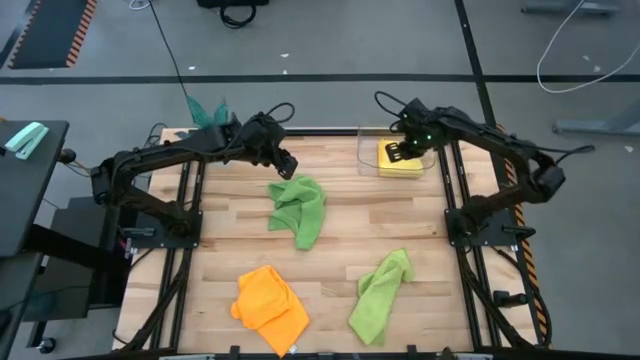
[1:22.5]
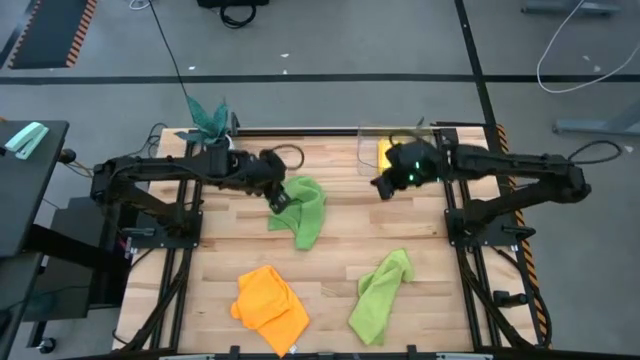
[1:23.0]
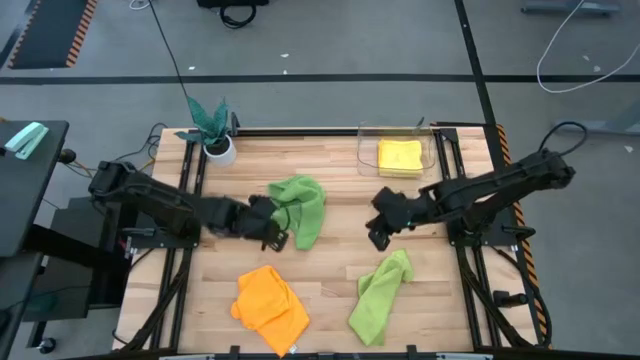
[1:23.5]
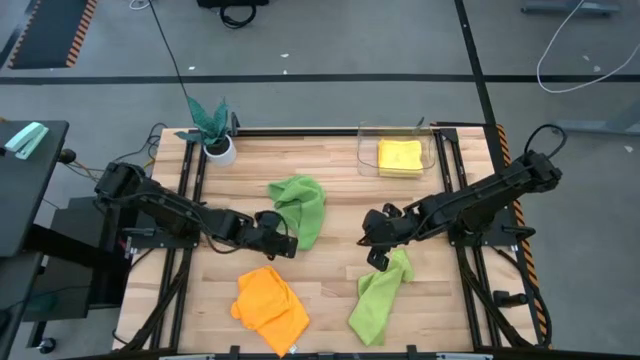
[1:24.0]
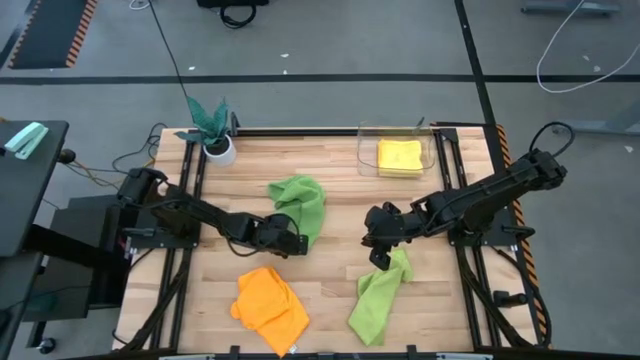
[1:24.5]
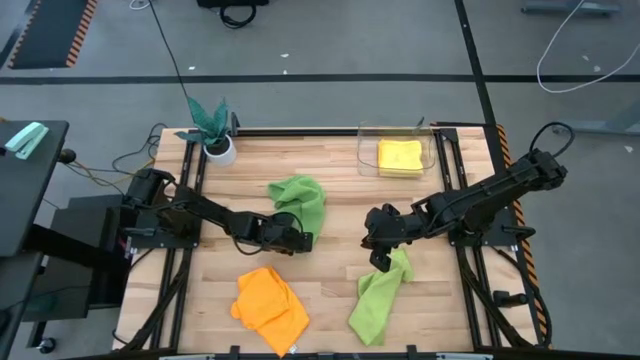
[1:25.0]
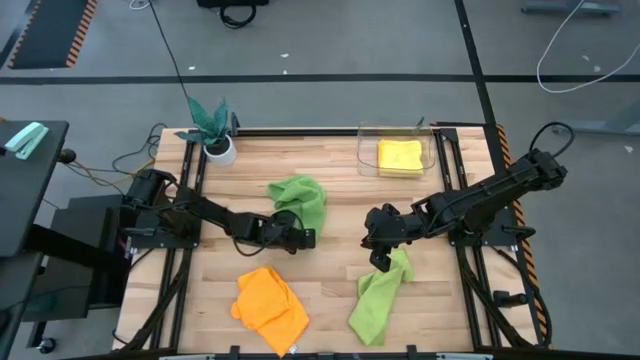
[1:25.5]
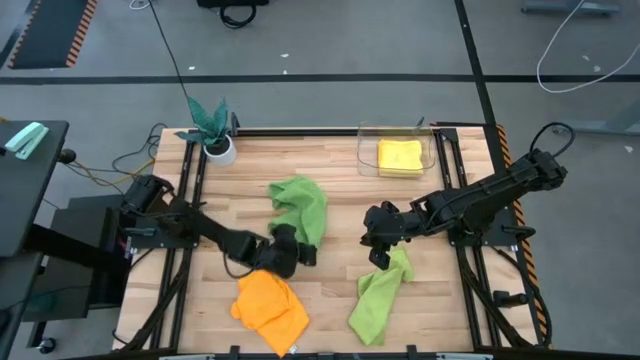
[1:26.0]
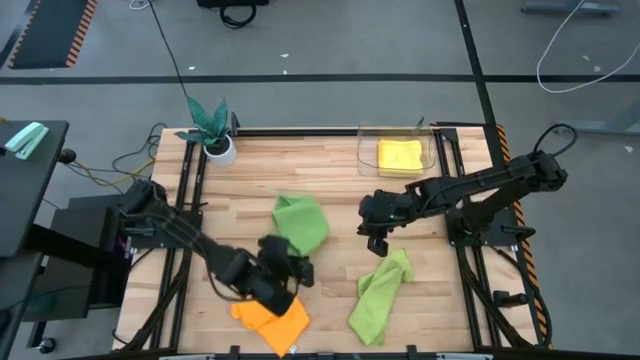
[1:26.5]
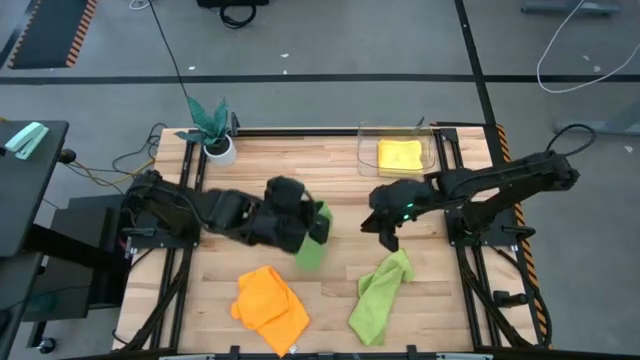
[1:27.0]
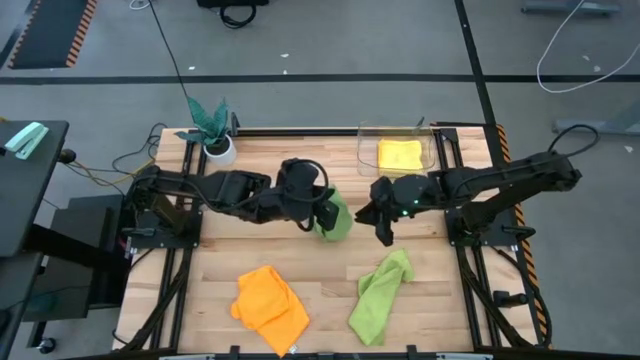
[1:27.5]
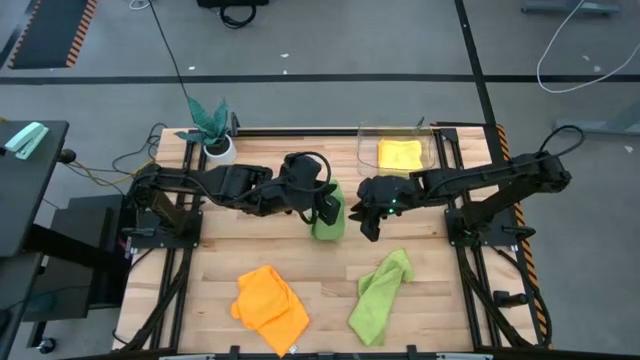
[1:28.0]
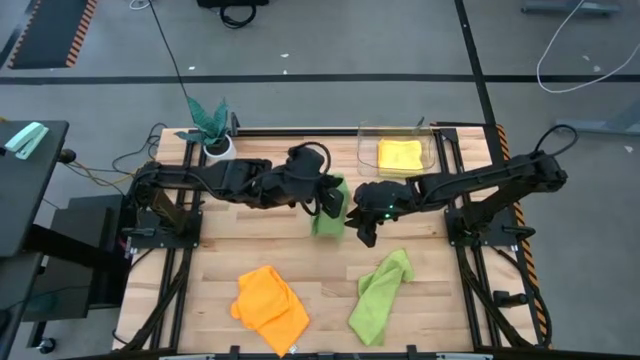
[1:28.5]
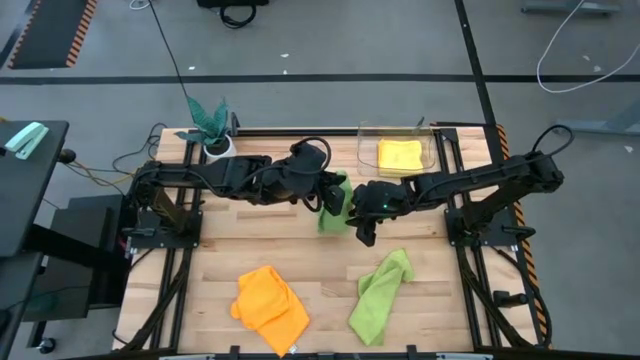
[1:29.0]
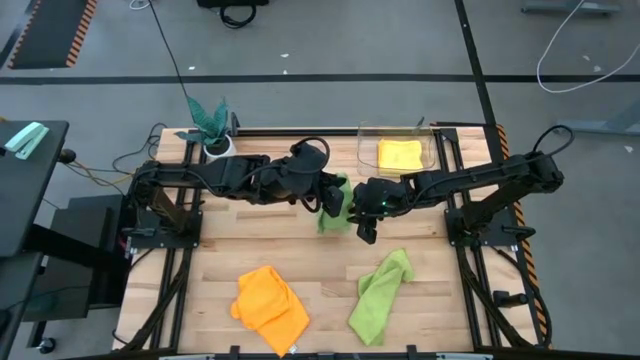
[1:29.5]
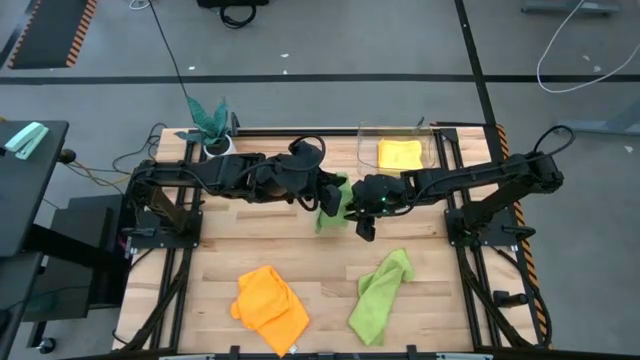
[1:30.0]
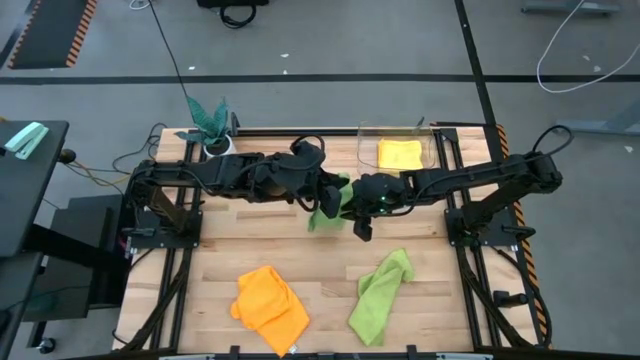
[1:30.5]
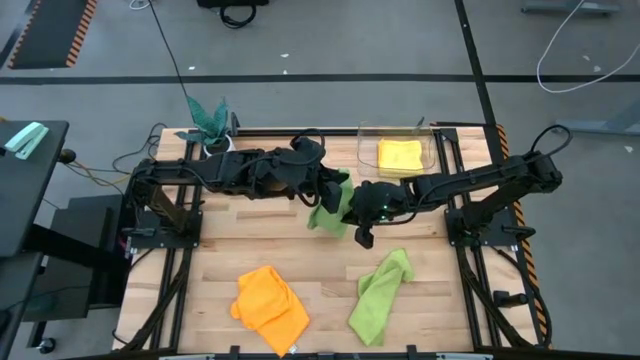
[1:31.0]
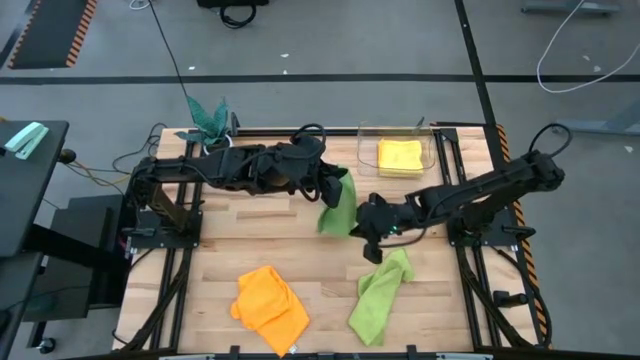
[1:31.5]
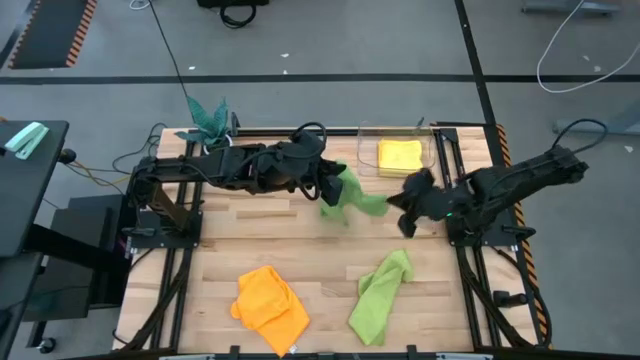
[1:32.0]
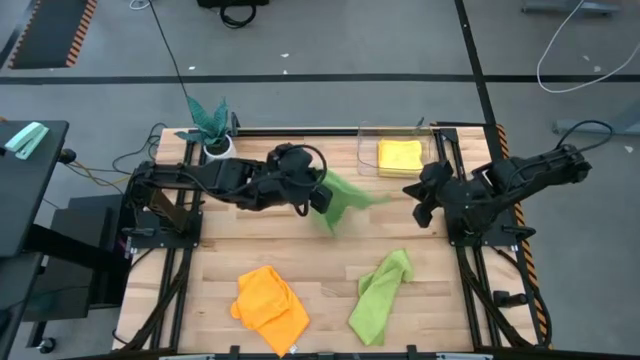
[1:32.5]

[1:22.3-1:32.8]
Task: Fold microfiber towels
Fold the green towel

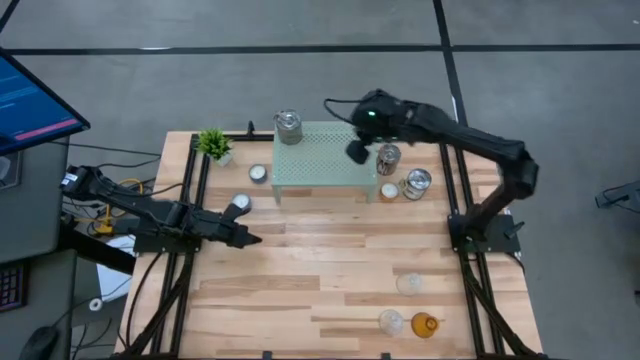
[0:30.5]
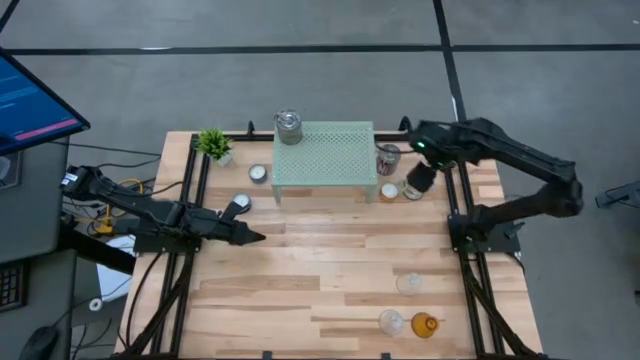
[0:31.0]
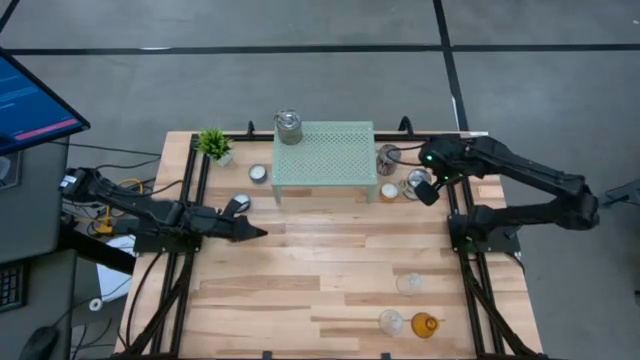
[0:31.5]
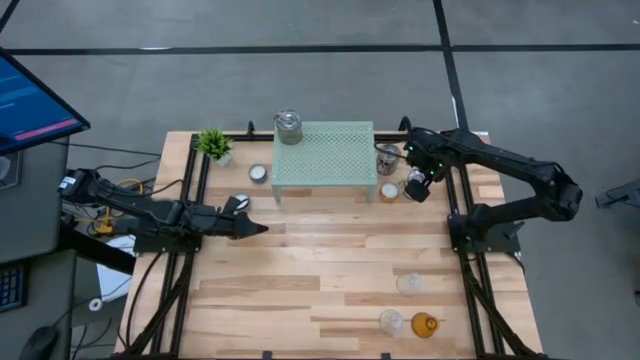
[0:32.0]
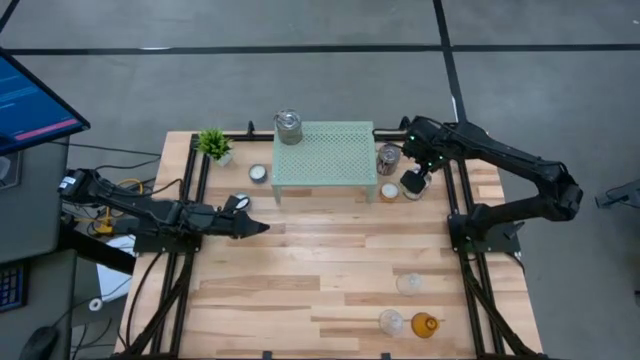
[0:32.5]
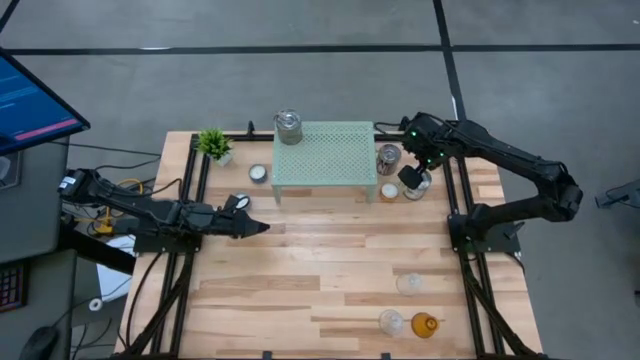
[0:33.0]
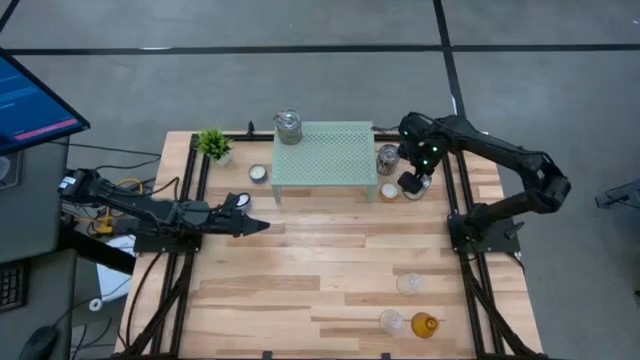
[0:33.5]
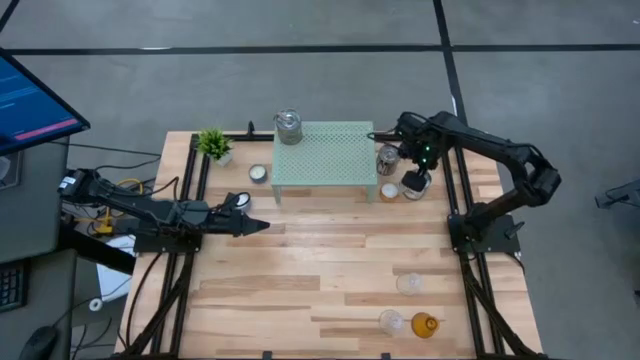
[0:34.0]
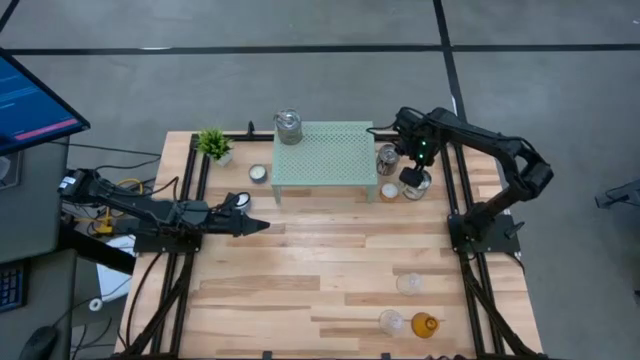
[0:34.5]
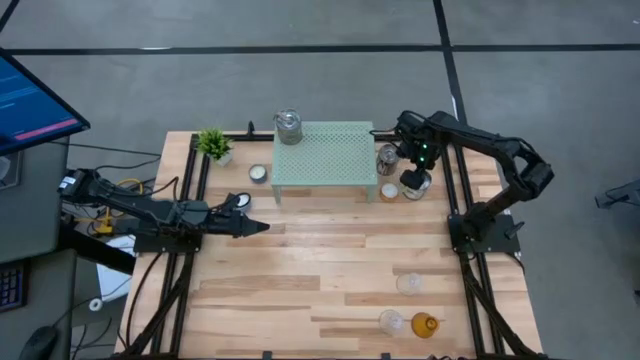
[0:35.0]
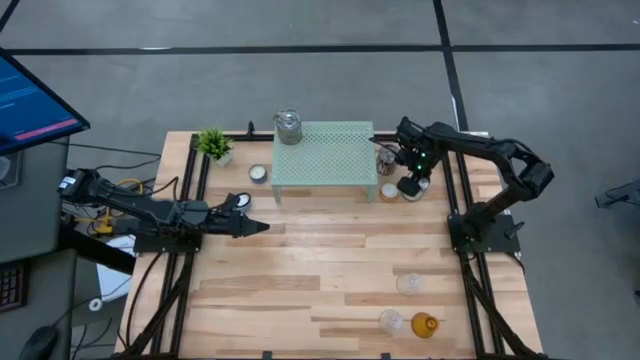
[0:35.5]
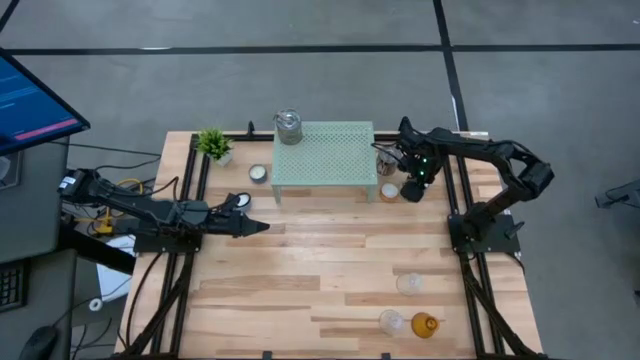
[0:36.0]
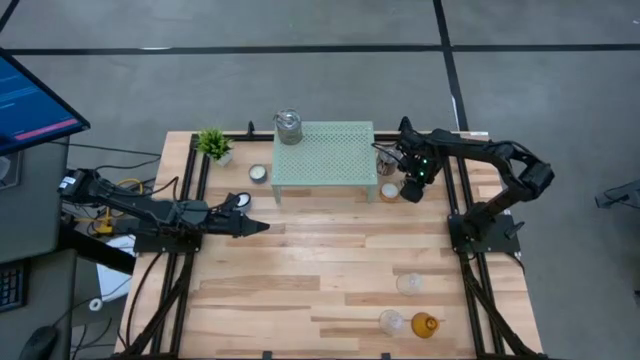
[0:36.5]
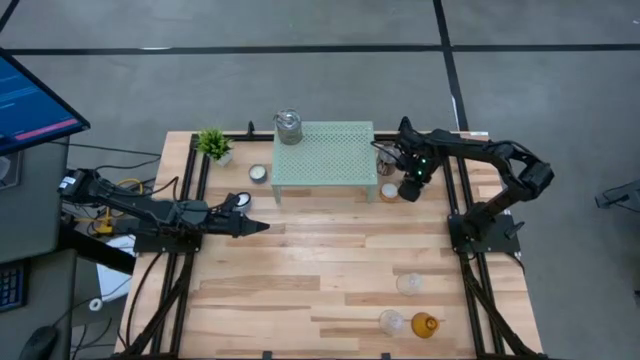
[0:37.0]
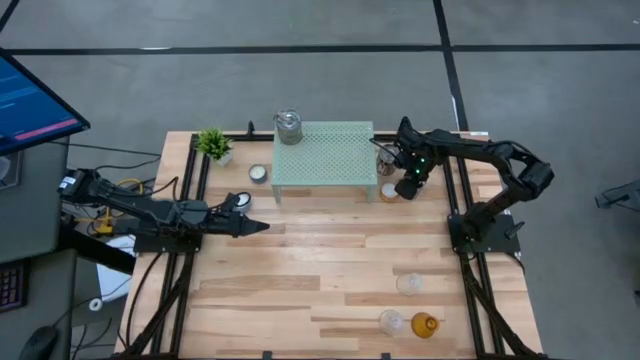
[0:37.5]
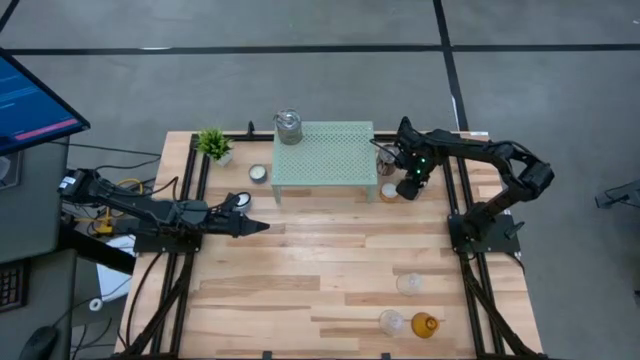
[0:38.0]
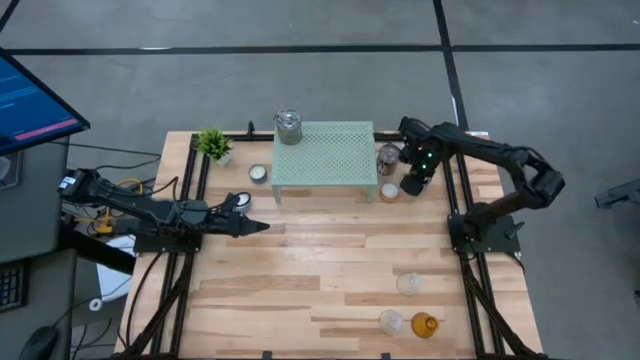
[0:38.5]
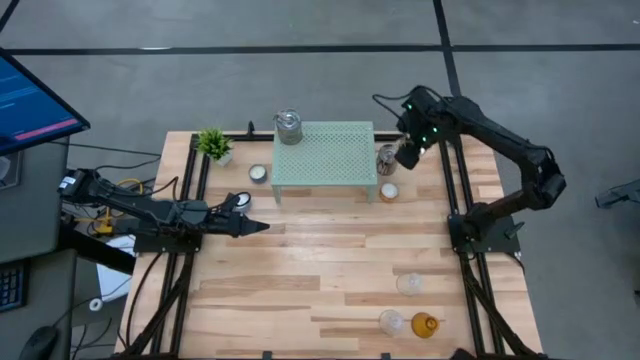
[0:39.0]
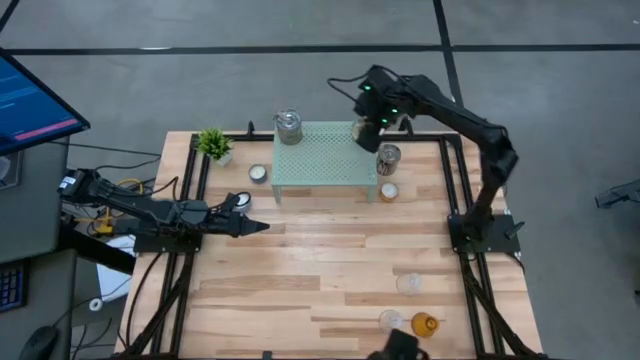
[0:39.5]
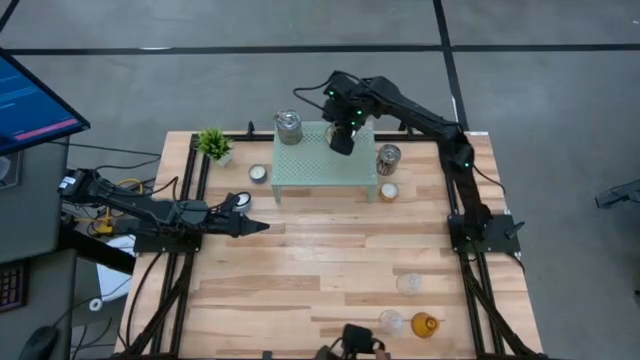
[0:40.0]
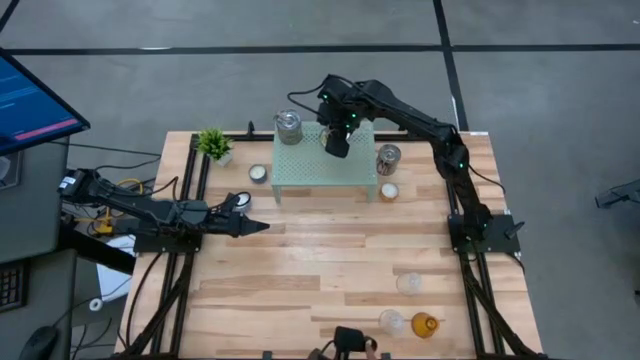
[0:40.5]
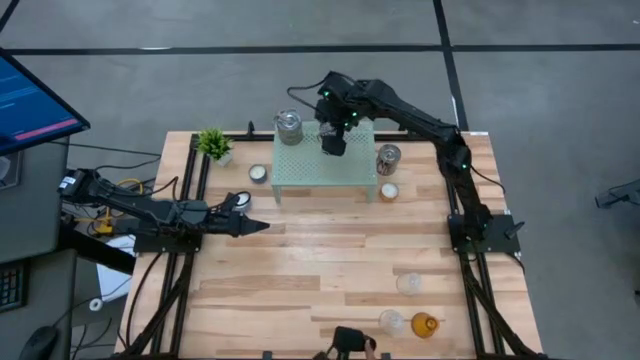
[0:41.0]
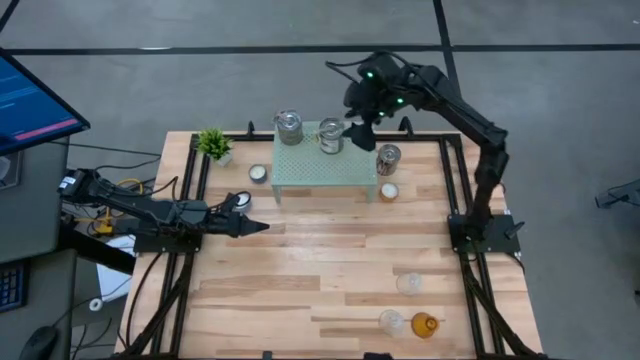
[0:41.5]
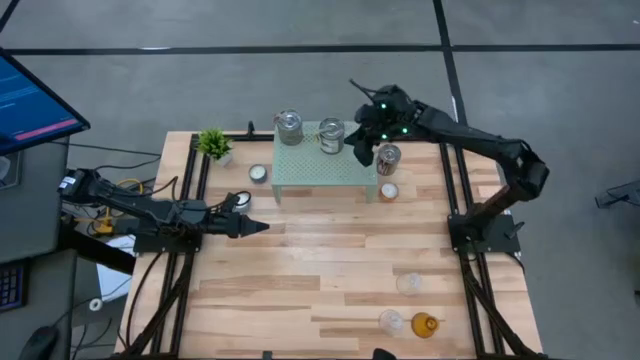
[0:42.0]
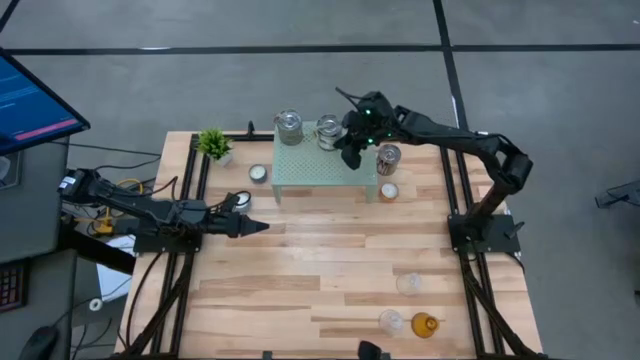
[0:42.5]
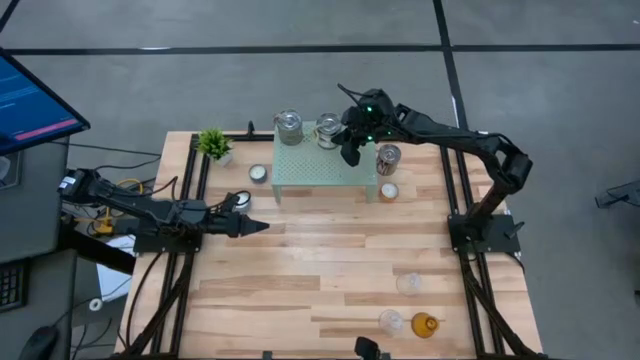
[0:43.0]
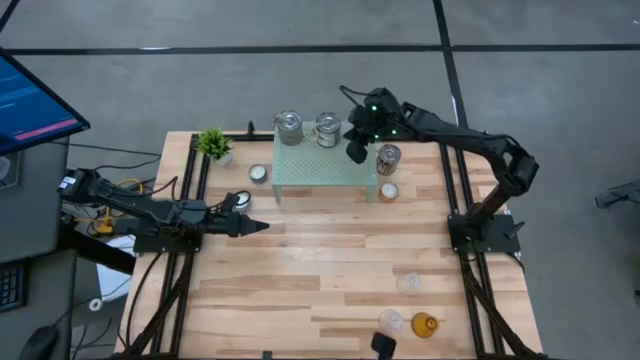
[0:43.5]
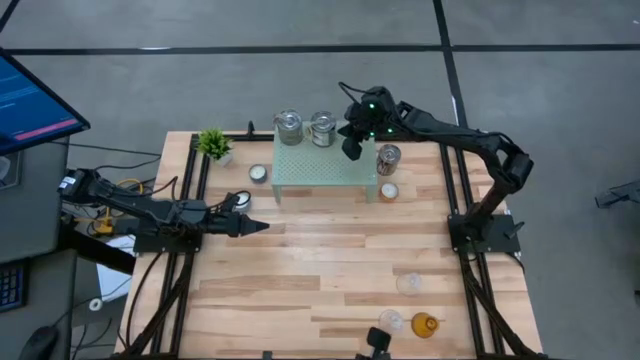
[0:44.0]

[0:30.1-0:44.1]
Task: Pick & Place candle stick holders
Put the bottom silver scented candle on the shelf aligned with the other silver scented candle
